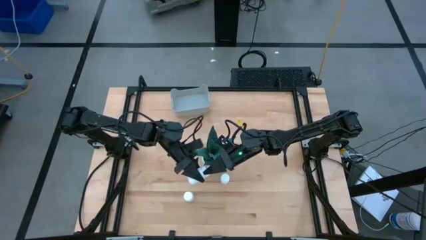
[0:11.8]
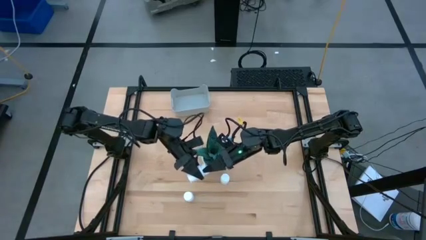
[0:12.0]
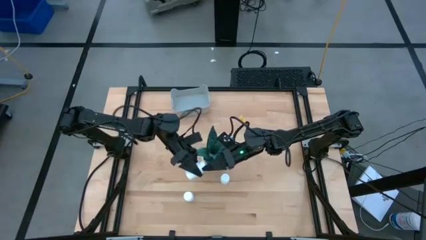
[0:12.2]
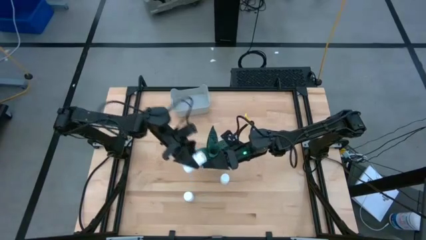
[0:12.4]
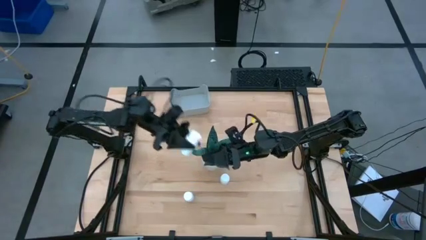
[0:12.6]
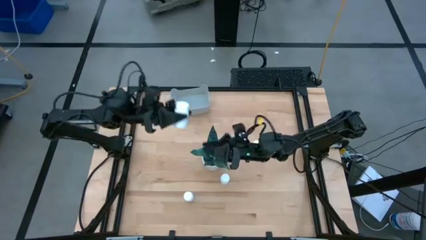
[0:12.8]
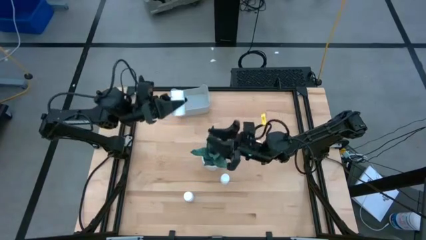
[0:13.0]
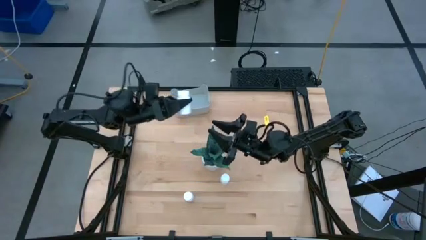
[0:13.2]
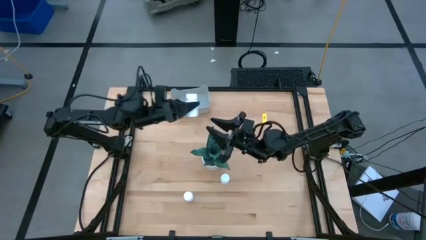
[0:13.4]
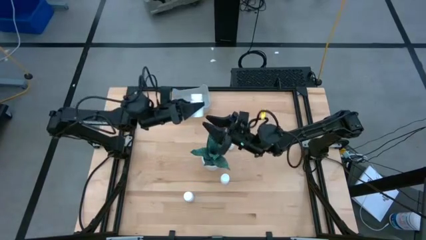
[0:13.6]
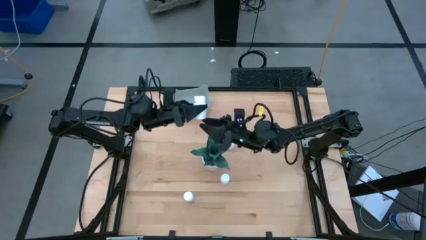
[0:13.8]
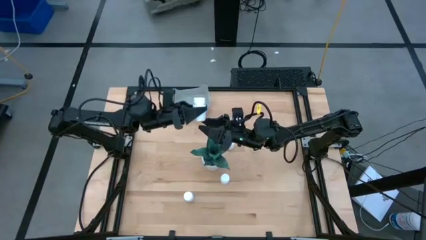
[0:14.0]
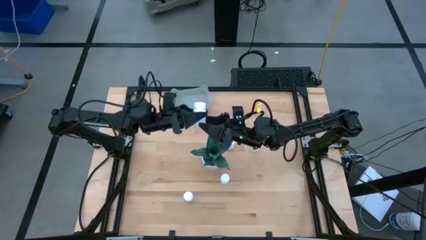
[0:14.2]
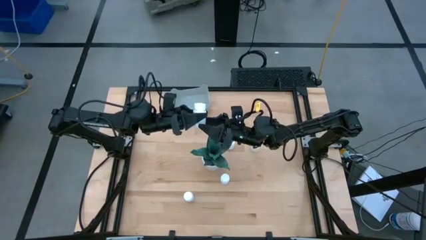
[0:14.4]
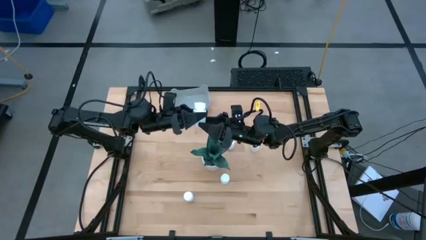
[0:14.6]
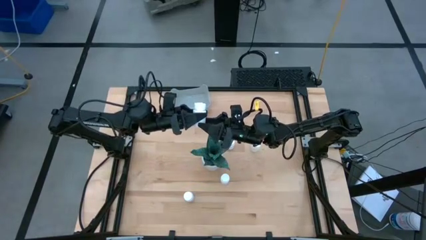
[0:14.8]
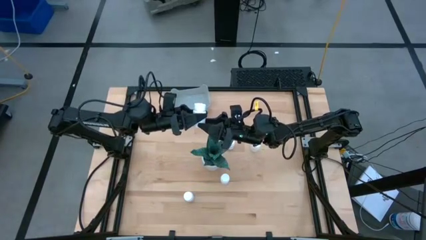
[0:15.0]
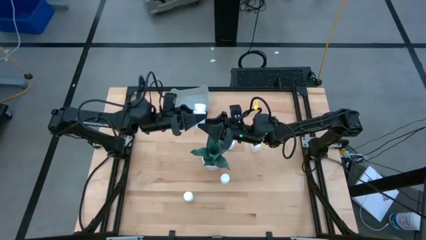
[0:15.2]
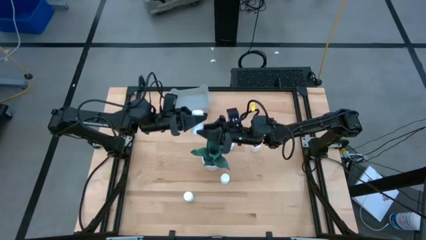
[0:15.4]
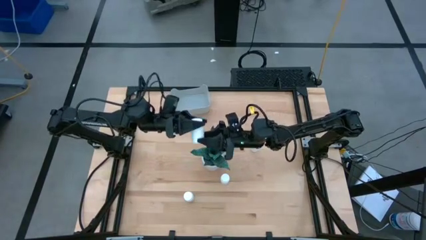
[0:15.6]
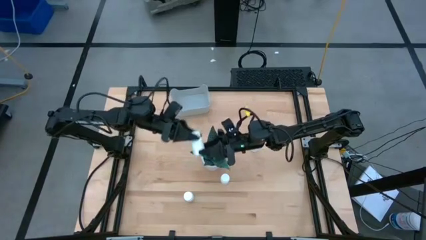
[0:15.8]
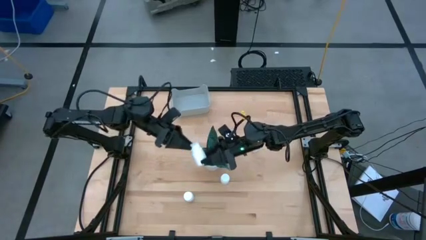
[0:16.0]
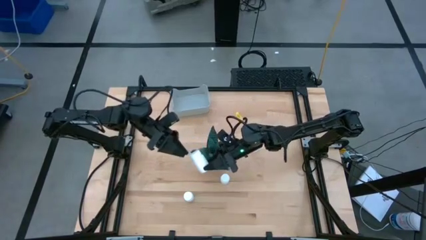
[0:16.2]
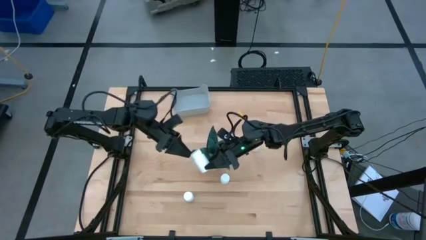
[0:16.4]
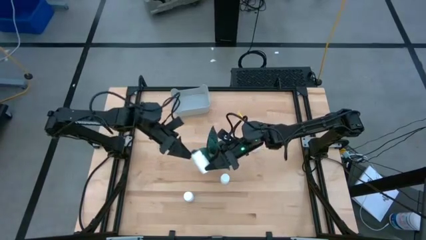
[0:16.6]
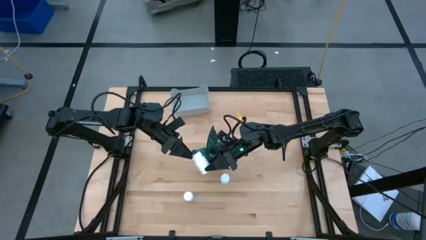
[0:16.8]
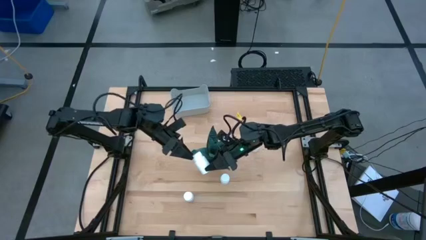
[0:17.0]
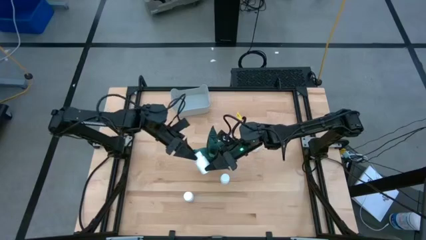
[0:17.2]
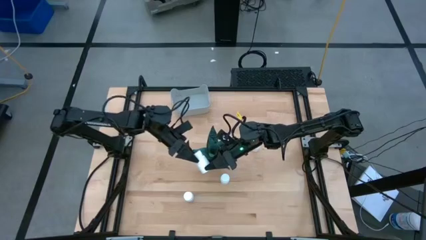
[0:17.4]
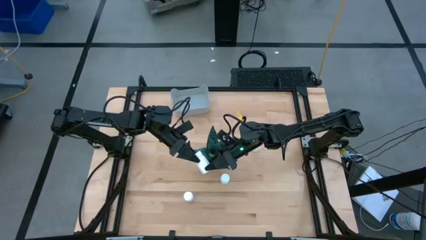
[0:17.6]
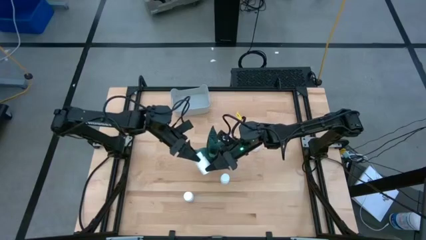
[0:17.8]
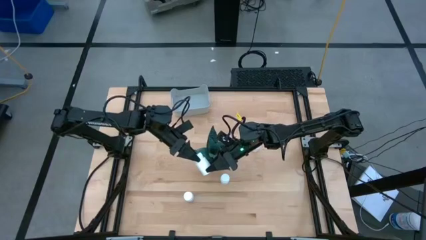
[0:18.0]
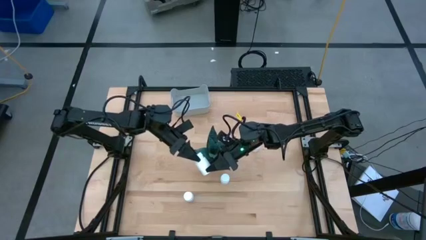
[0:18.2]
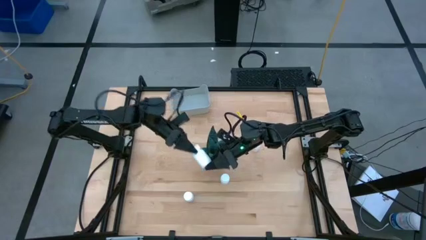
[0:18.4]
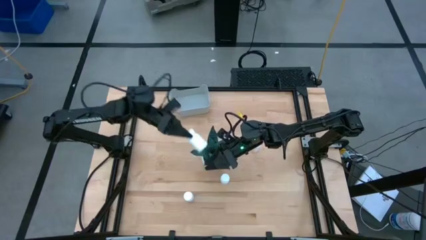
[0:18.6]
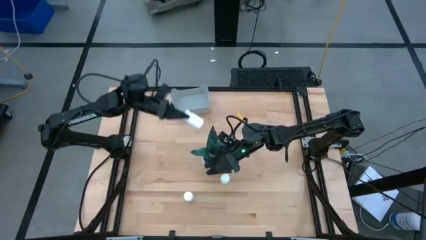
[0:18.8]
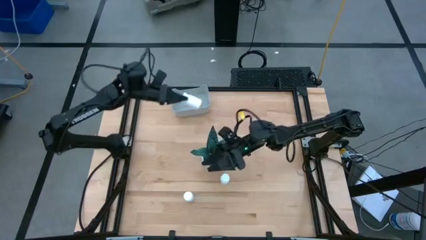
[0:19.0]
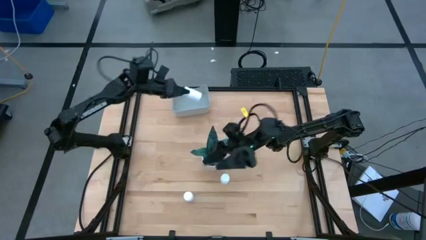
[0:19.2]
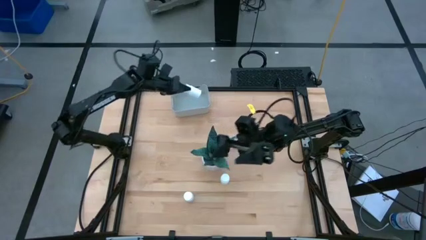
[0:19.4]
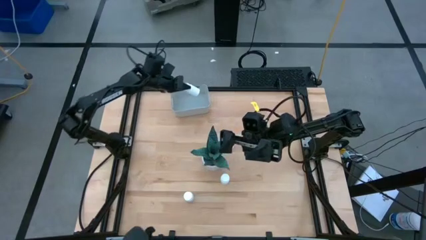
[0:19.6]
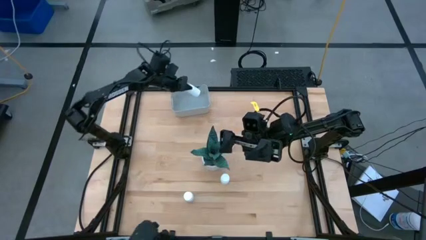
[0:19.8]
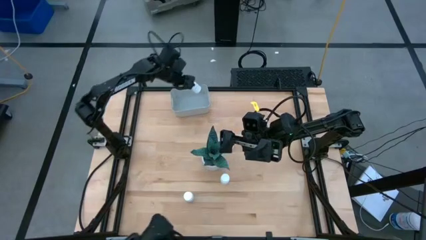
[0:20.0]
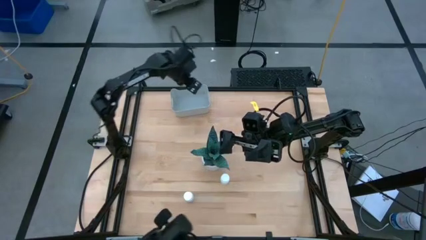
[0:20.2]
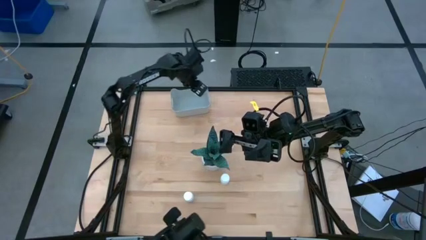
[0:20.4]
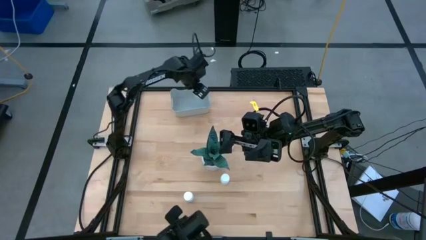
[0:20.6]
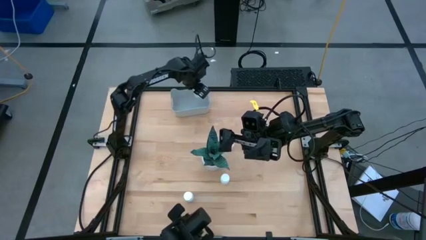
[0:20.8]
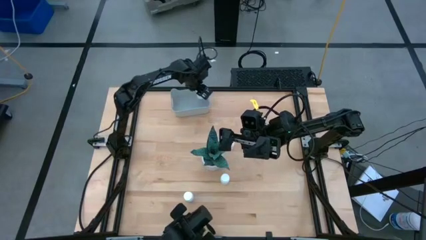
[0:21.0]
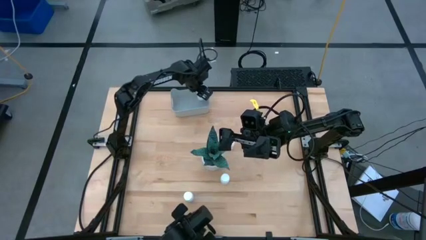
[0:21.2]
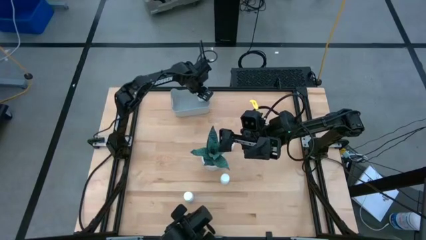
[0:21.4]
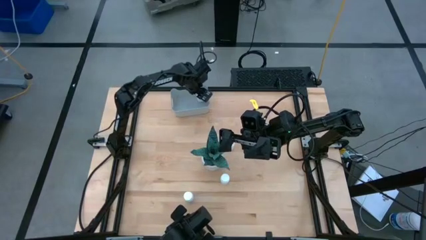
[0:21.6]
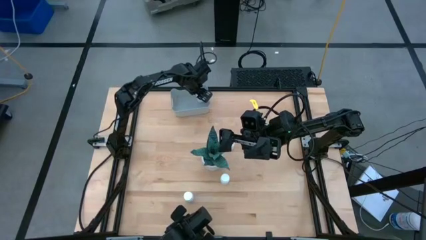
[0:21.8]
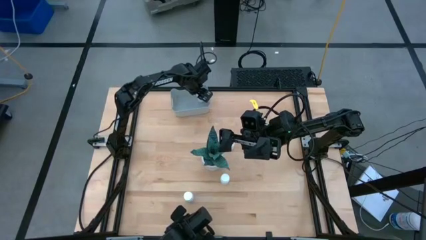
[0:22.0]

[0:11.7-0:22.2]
Task: Pick and place pill bottles into a basket
Put the white medicine bottle into the gray bin

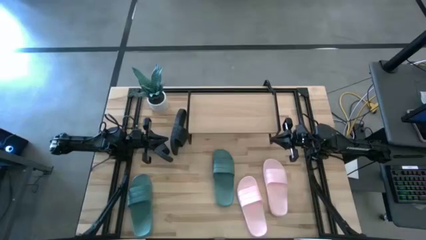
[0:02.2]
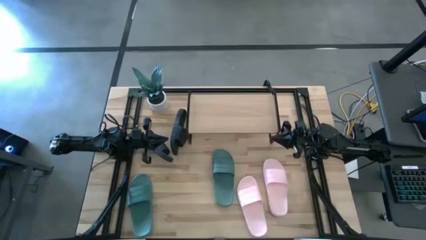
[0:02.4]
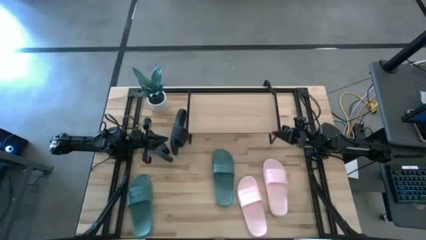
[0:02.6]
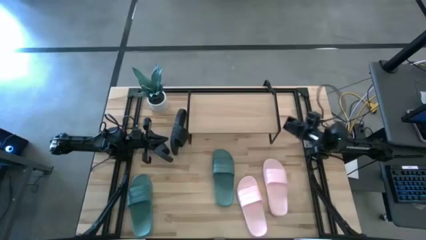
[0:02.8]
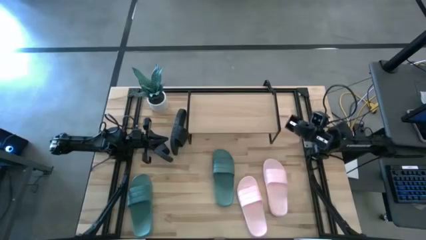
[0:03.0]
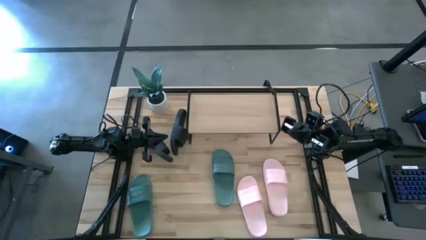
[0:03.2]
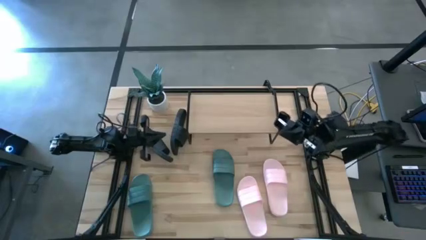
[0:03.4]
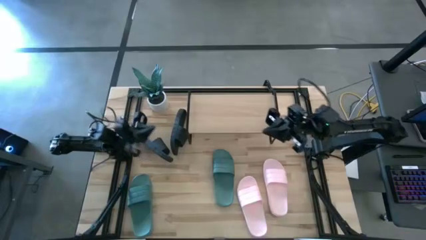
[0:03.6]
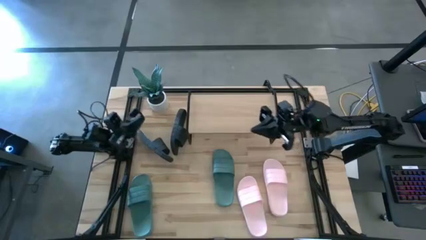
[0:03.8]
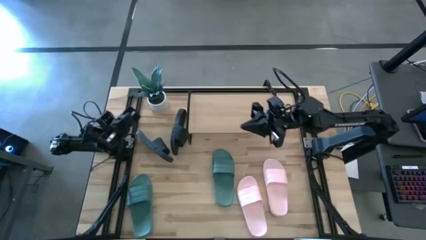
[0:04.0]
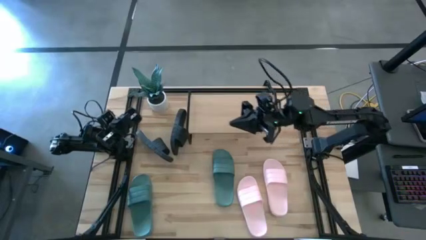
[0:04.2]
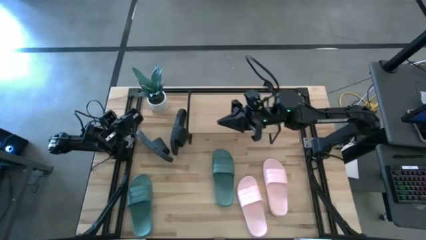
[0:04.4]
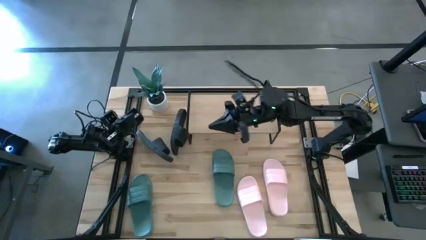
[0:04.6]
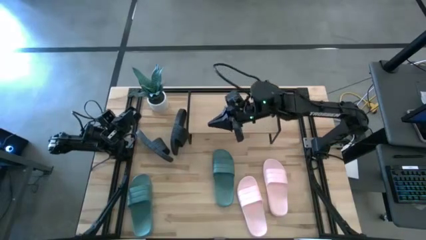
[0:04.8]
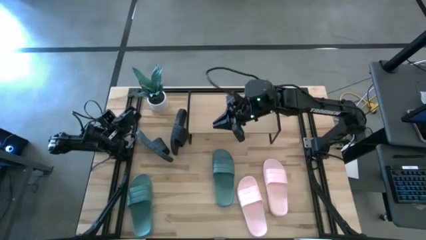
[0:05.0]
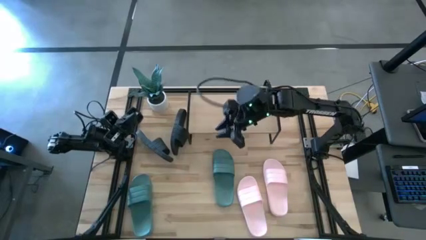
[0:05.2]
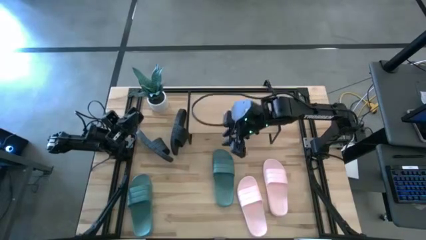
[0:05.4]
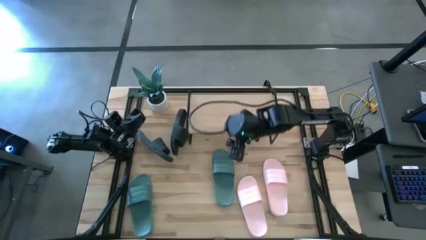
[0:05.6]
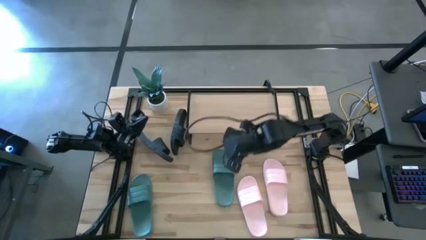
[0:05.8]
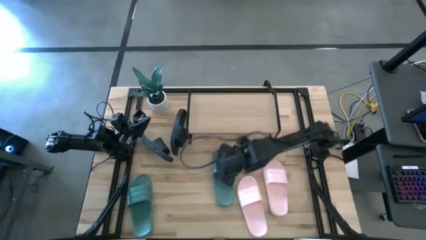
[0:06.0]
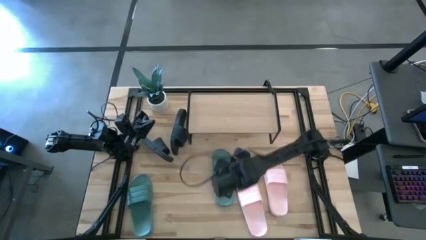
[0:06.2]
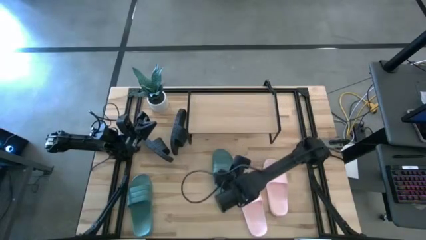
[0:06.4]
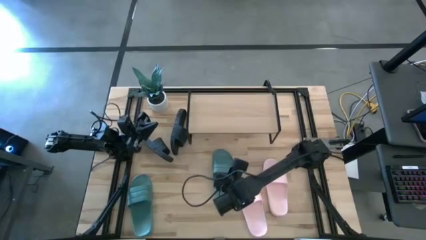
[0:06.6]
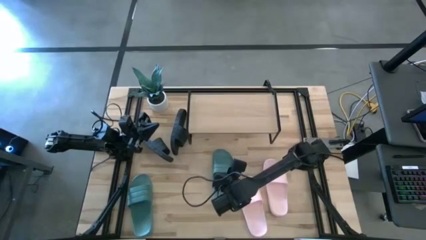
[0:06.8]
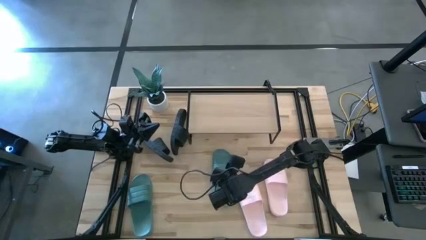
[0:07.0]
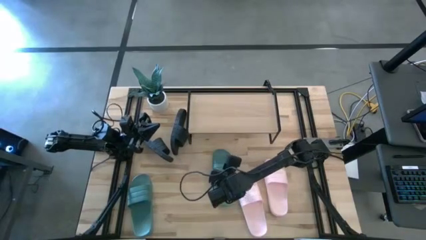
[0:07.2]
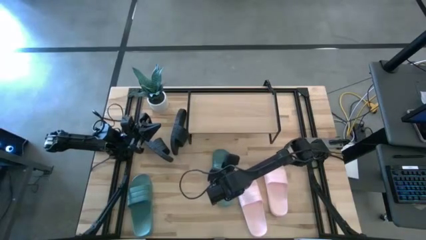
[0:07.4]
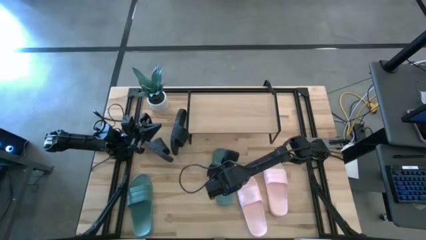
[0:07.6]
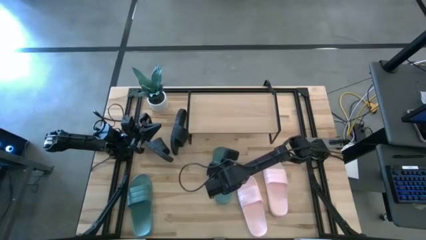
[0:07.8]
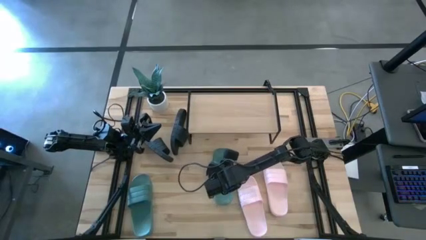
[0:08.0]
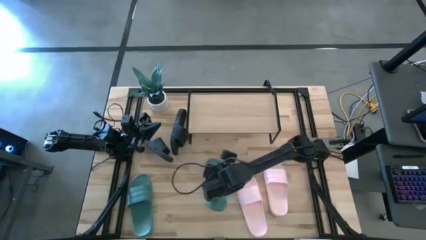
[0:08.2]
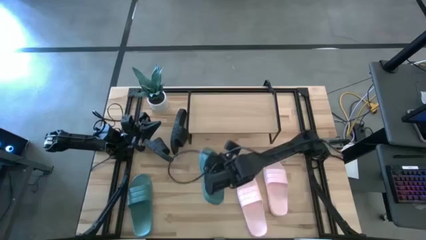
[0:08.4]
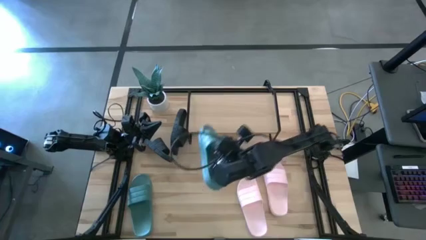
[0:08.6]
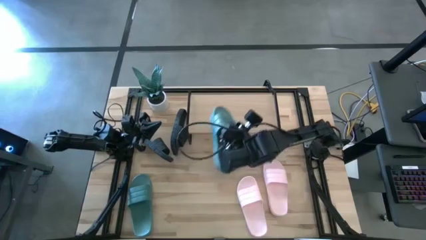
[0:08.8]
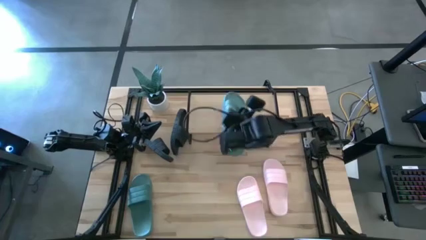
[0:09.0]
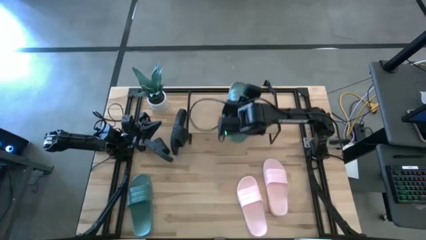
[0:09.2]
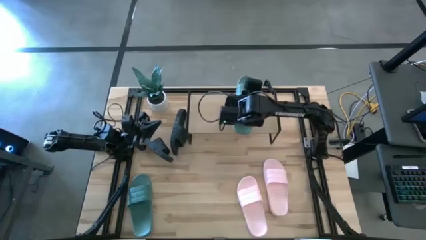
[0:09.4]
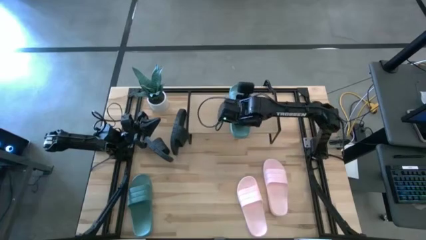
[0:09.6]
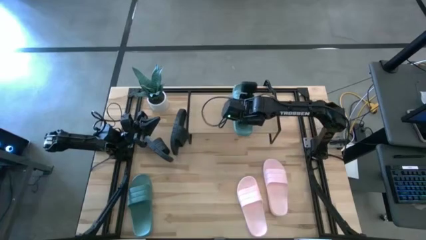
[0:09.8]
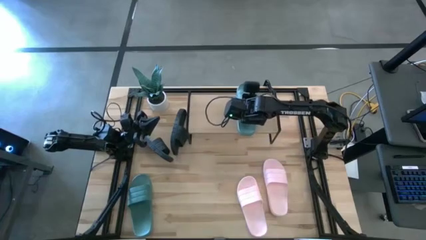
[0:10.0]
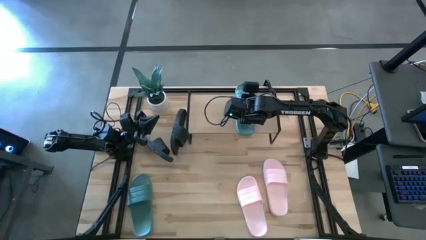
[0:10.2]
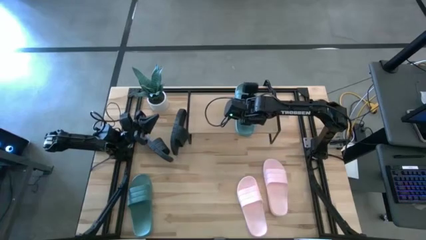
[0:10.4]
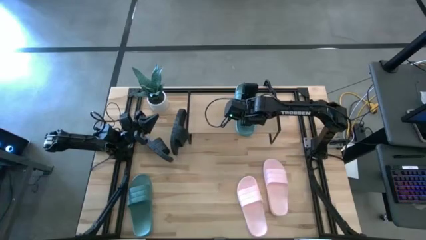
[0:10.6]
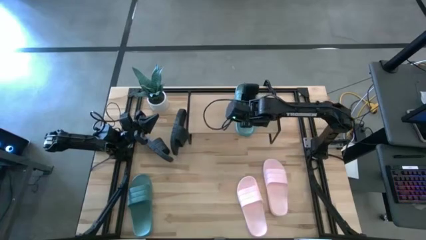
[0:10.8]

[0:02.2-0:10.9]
Task: Pick and place slides into the shelf
Put the right green slipper on the shelf
